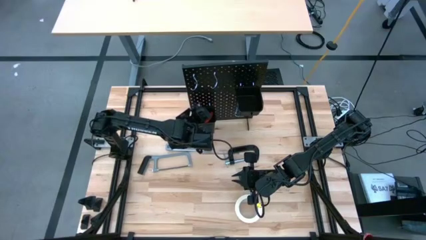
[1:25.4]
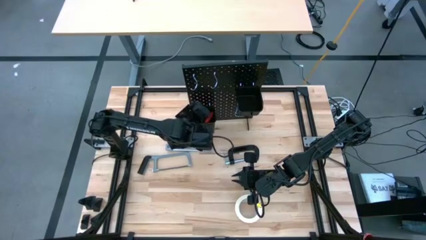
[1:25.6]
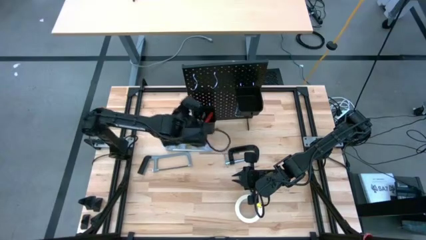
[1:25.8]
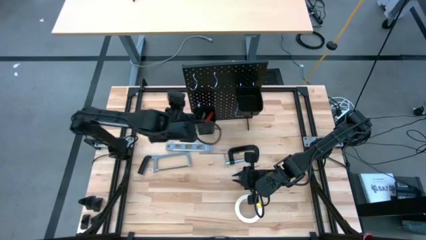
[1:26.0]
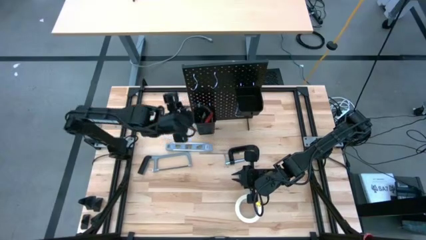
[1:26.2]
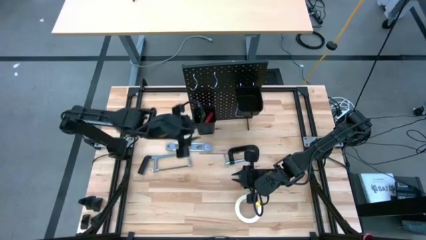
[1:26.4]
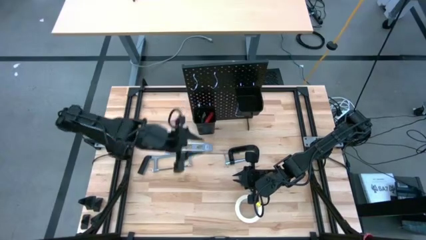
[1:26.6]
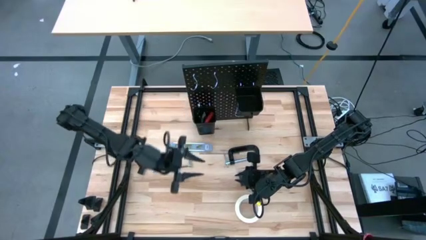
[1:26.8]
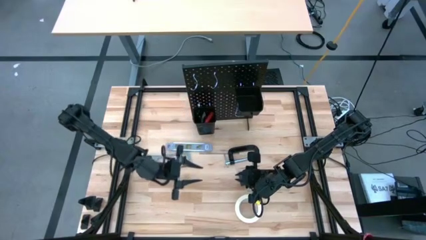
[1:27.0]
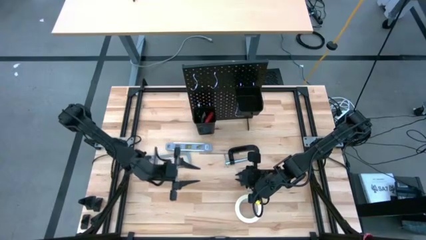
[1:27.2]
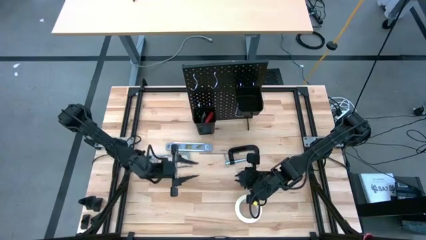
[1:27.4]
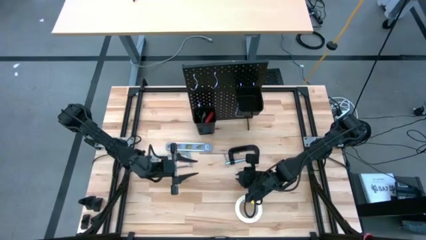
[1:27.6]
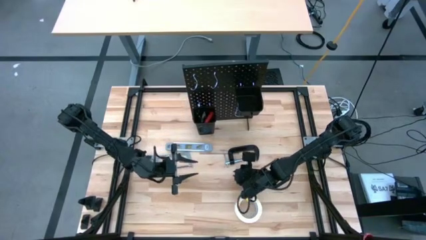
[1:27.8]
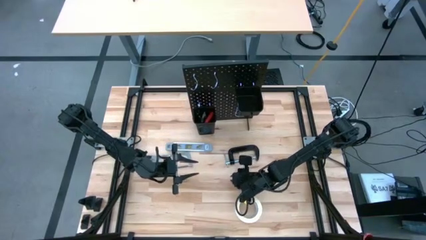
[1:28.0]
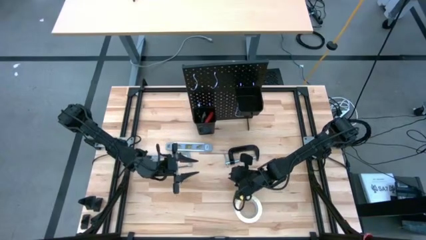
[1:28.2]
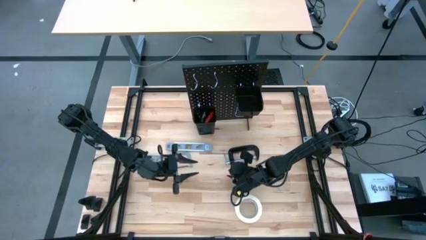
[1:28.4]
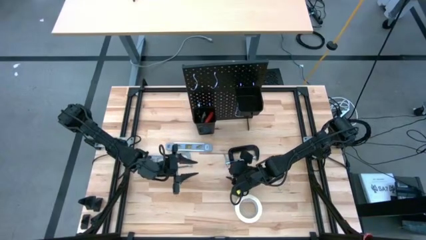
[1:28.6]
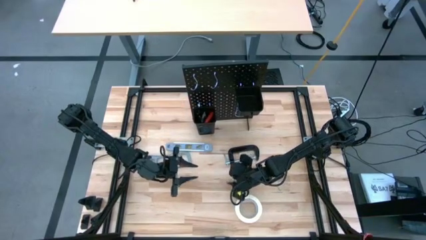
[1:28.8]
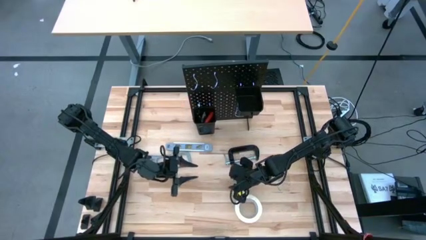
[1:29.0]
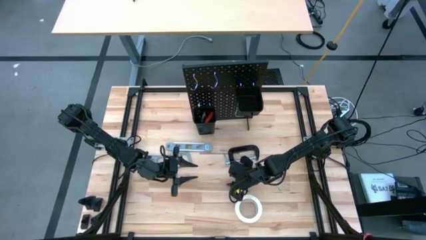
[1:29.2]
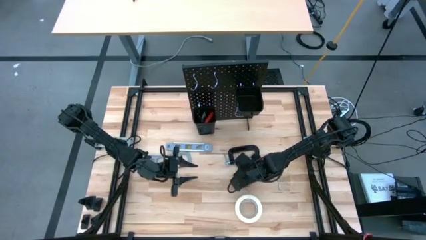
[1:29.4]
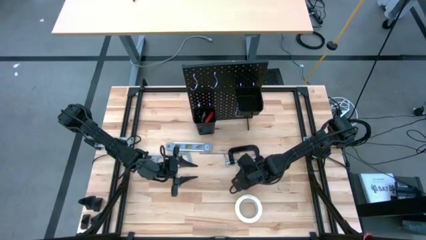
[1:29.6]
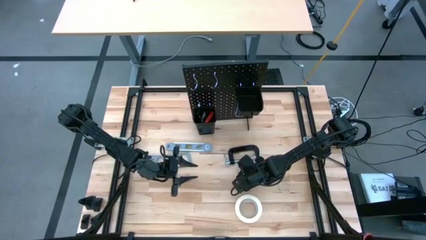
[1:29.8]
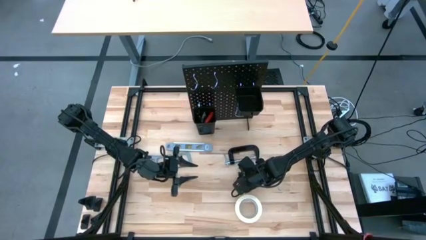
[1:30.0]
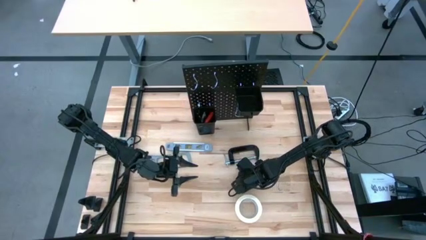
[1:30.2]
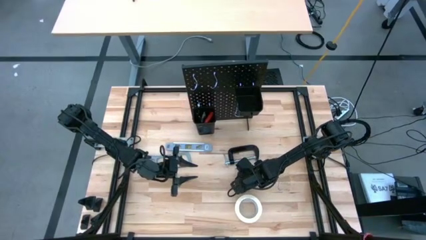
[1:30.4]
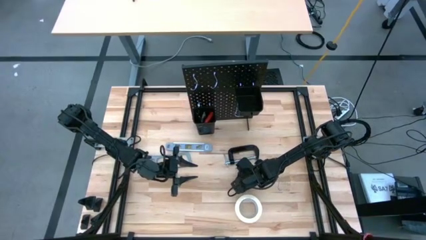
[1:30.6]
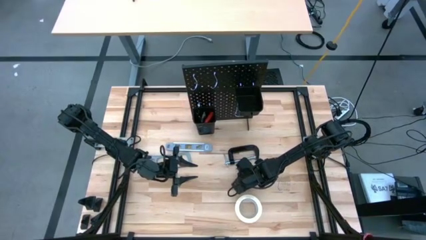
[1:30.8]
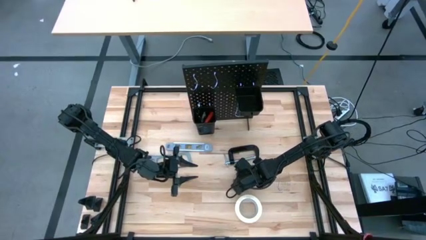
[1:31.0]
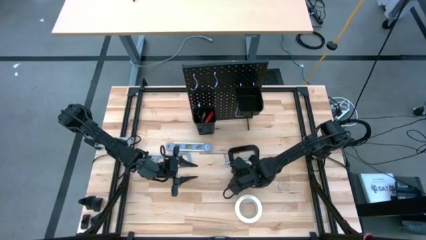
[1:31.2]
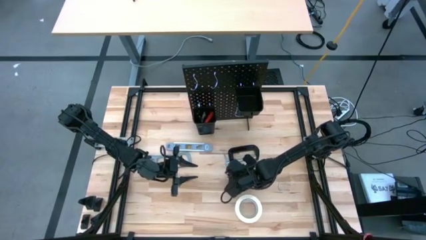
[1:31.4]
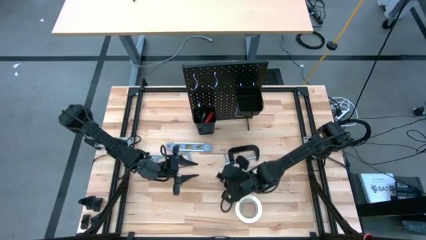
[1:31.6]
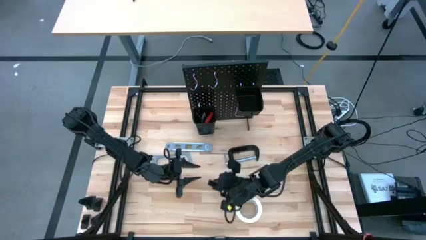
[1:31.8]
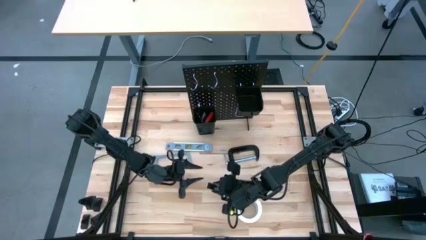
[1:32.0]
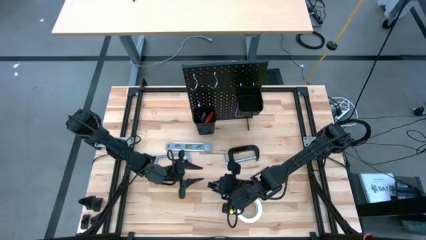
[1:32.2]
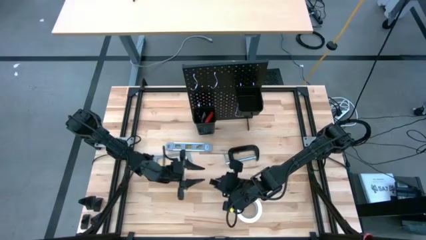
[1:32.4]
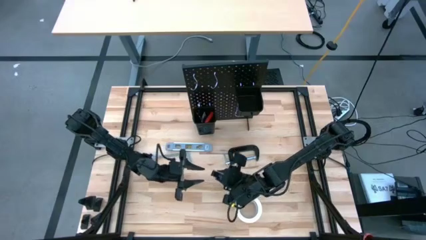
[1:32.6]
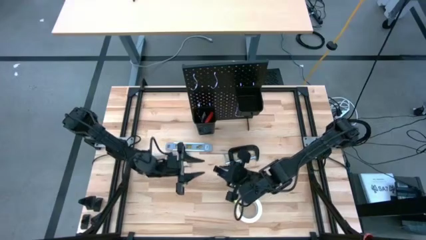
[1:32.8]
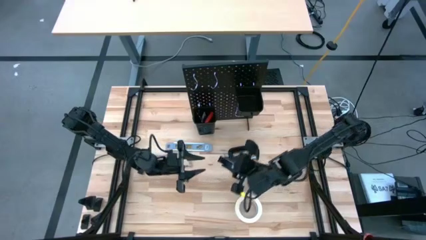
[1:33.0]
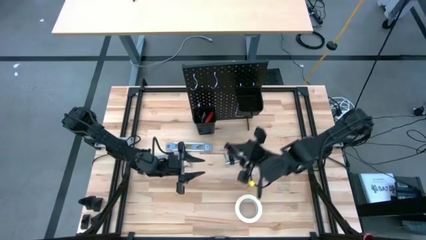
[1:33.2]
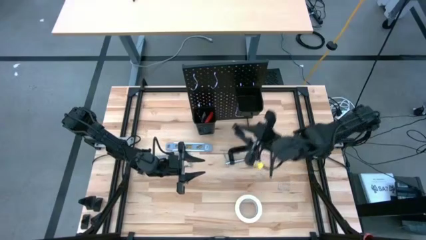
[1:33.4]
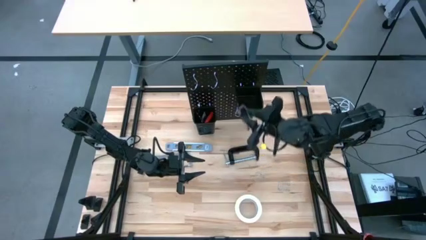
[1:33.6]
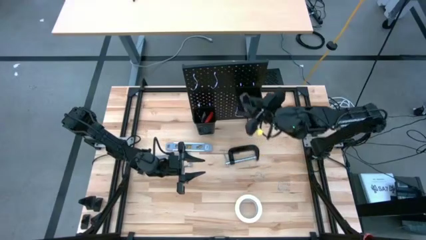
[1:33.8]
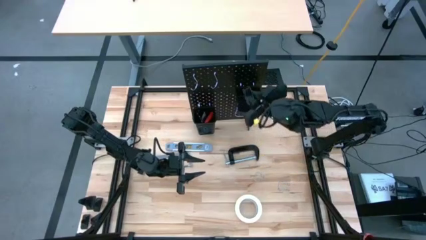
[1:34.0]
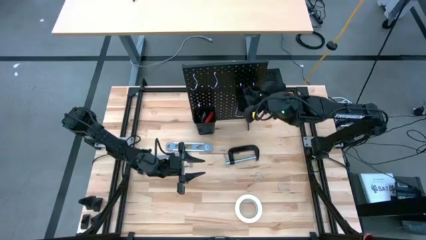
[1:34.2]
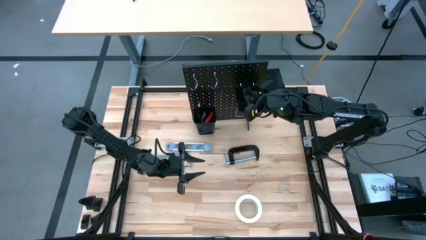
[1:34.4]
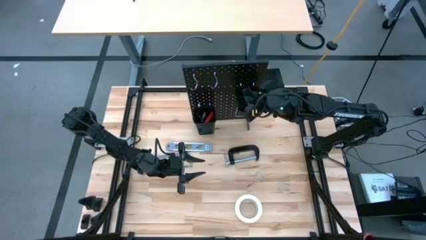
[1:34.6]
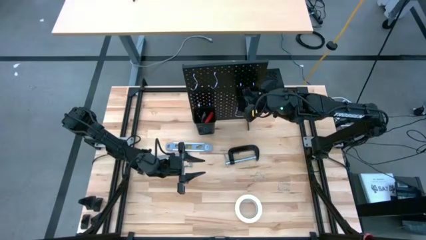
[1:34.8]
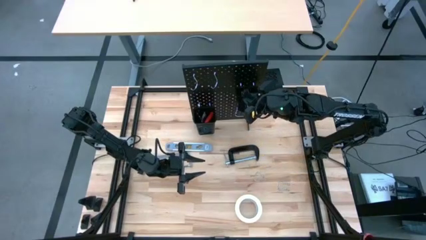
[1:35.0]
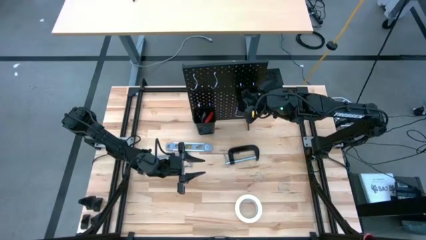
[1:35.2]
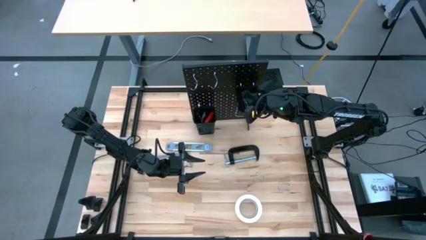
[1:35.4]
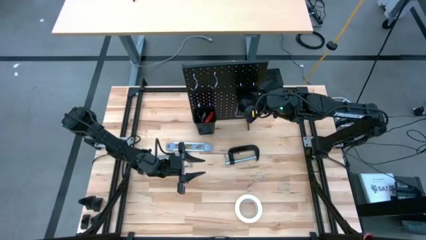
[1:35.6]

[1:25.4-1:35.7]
Task: Hang tools onto peg board
Put the small spirit level into the top black bin on the pegboard

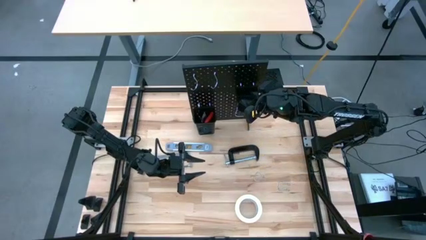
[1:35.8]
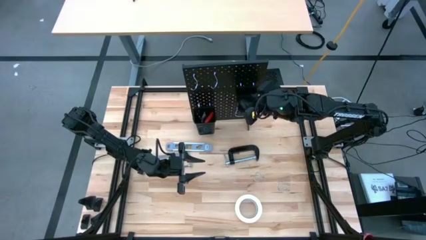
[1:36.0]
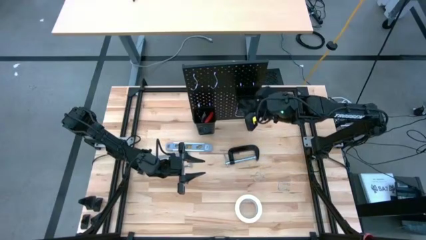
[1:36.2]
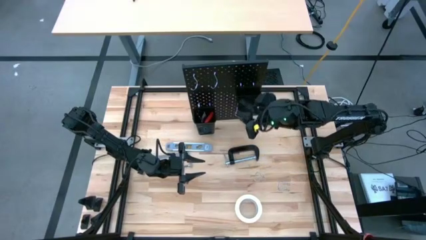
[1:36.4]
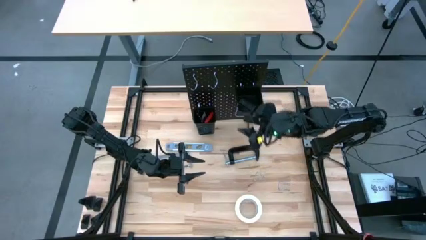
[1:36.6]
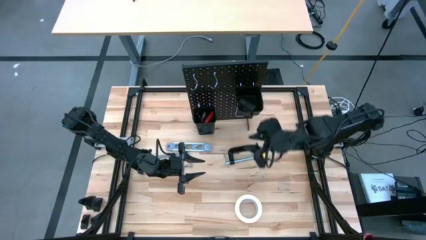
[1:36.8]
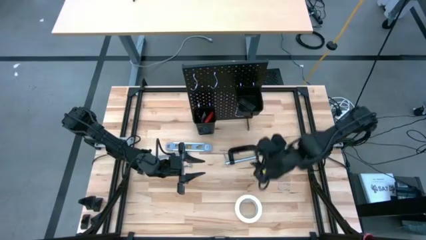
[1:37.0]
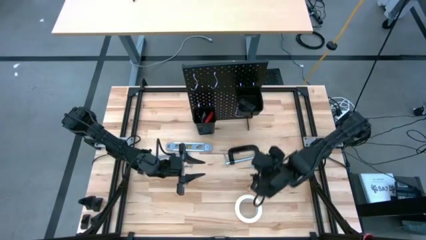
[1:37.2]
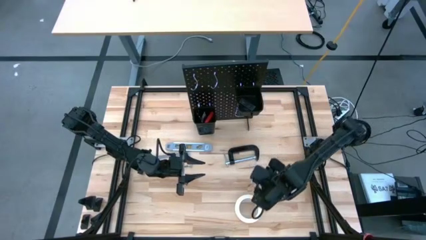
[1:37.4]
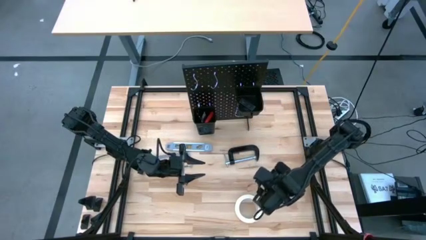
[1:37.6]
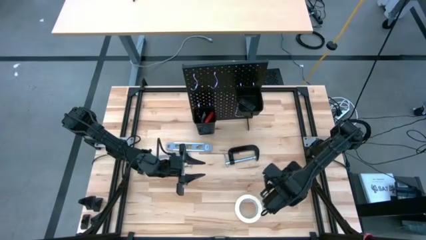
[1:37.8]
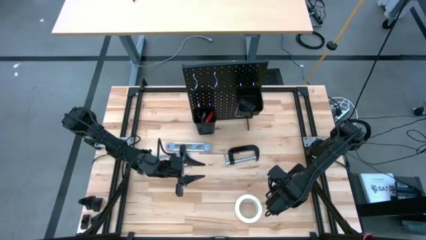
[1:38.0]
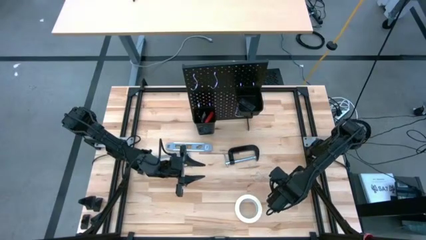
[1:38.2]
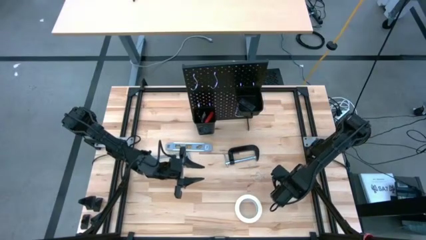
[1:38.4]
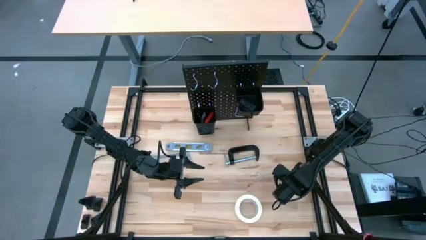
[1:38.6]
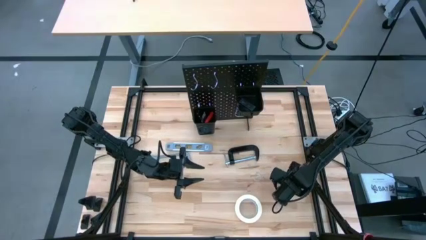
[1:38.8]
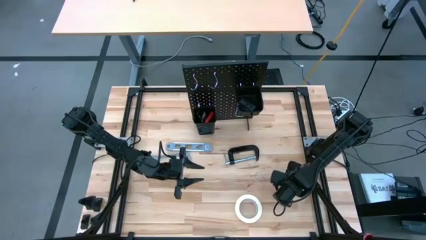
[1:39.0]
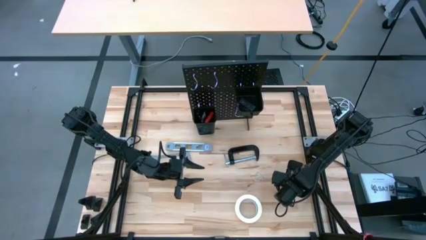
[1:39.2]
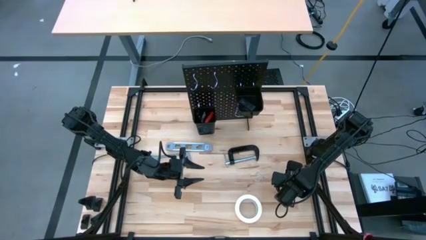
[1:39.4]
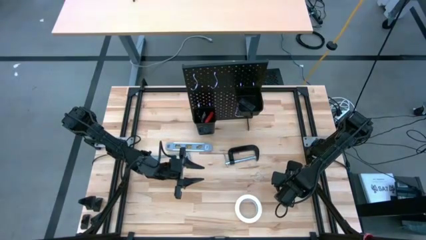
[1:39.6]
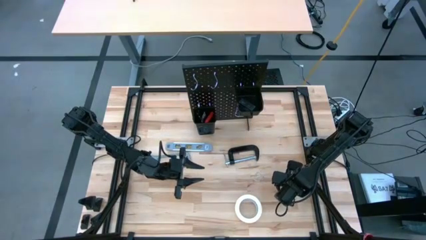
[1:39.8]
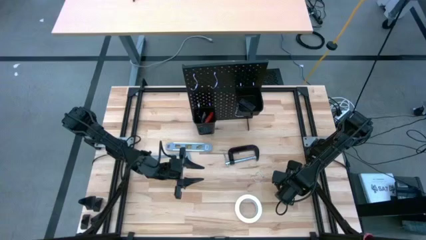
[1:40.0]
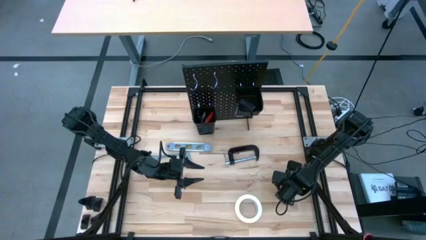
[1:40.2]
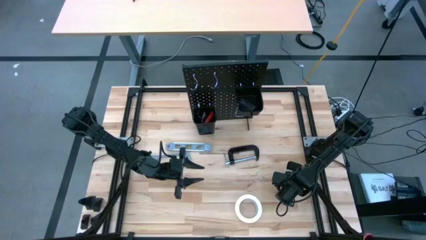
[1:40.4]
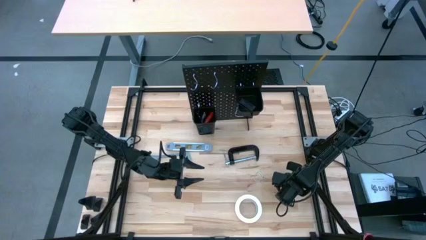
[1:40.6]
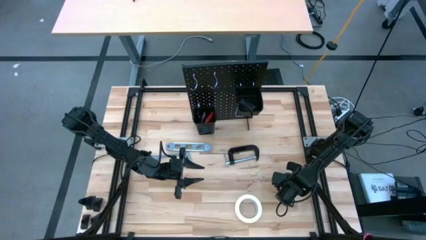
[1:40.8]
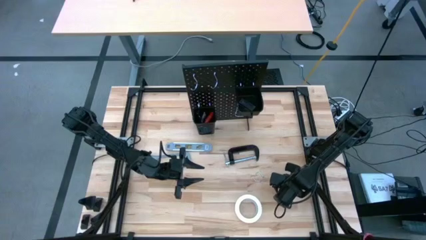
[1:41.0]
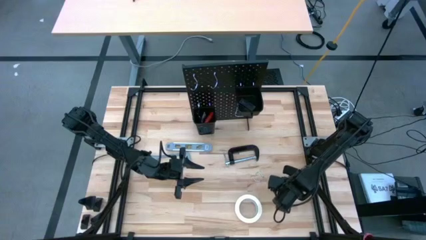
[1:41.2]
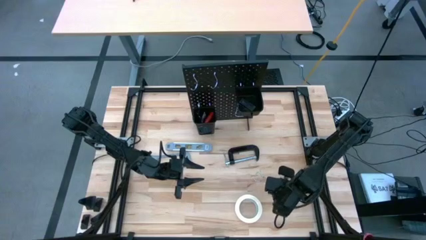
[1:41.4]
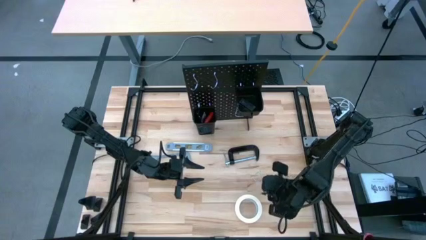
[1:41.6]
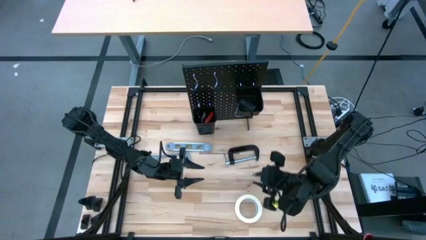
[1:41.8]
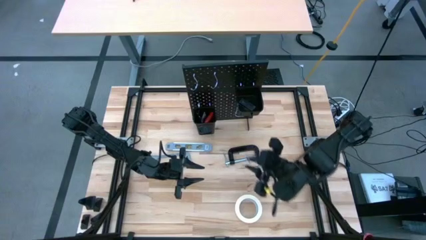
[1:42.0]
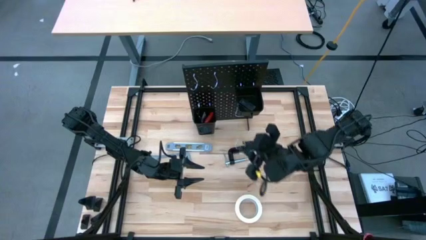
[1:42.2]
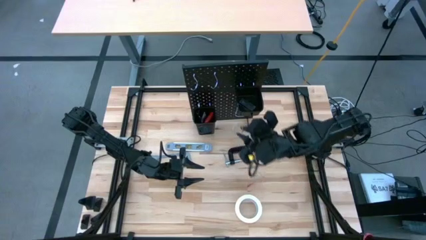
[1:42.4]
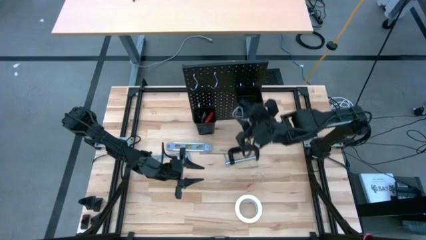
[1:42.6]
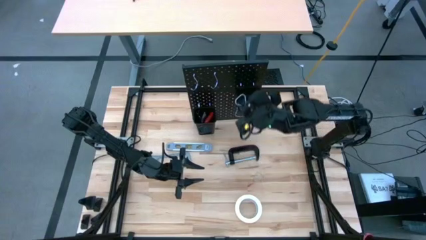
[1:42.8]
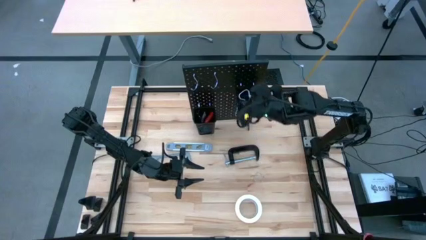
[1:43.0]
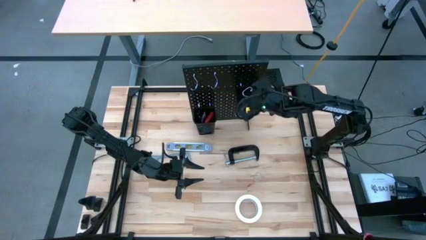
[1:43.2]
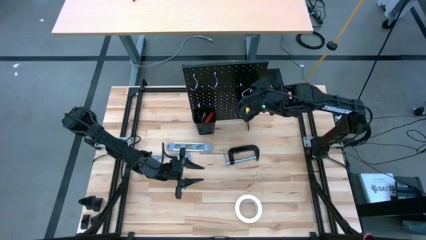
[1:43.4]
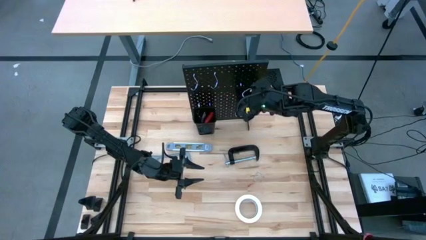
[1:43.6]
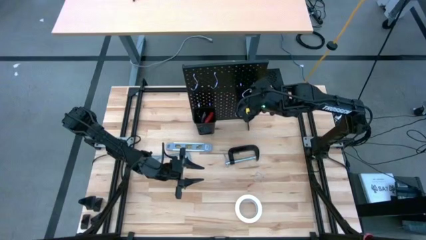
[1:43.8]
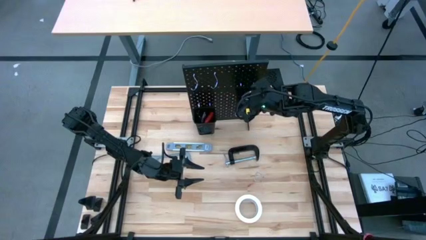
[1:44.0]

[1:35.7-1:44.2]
Put the bottom binder clip into the top black bin on the pegboard
